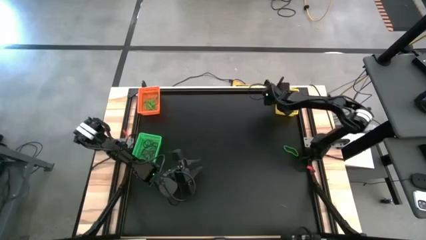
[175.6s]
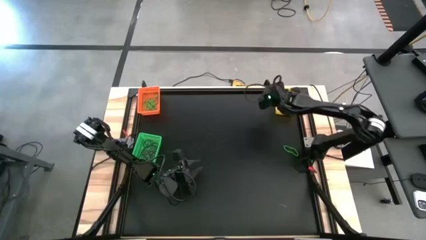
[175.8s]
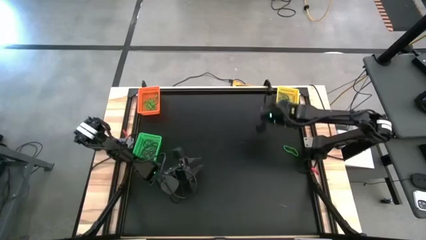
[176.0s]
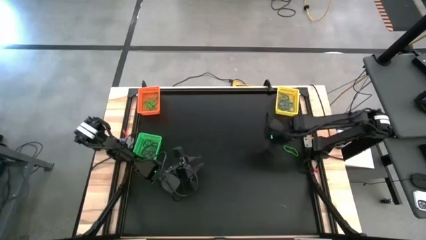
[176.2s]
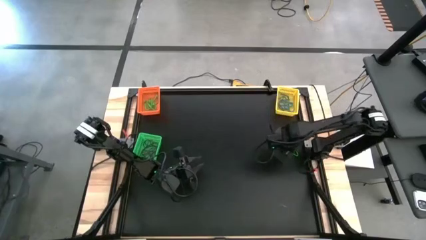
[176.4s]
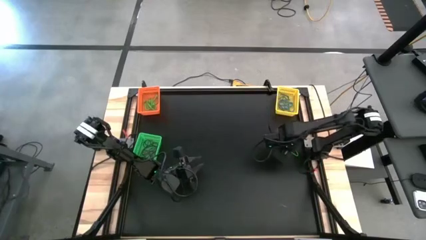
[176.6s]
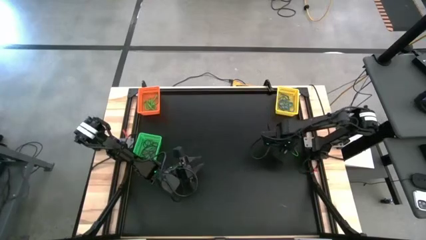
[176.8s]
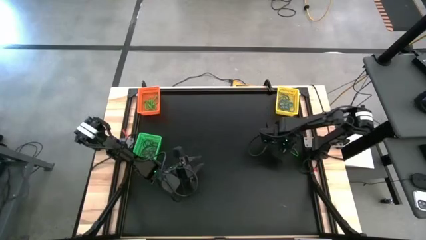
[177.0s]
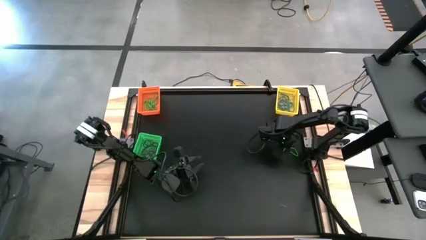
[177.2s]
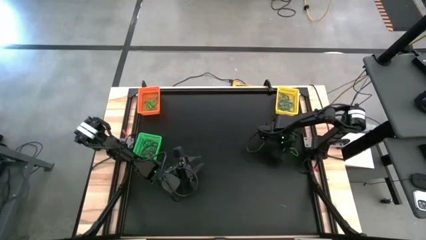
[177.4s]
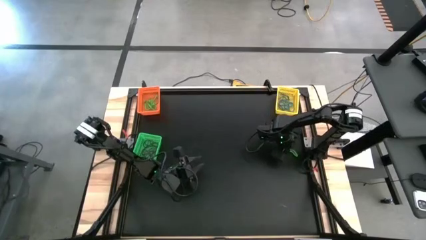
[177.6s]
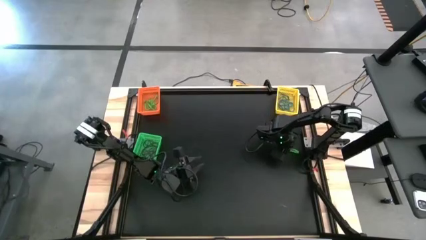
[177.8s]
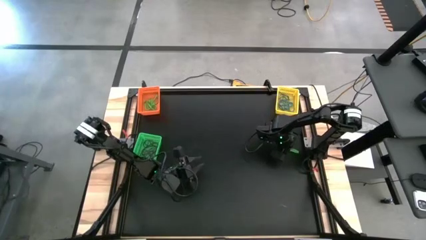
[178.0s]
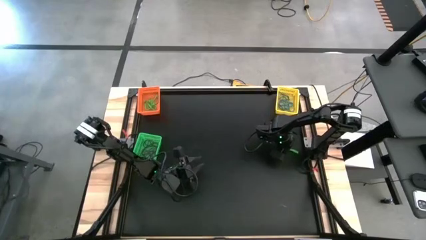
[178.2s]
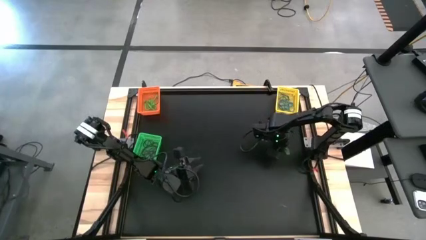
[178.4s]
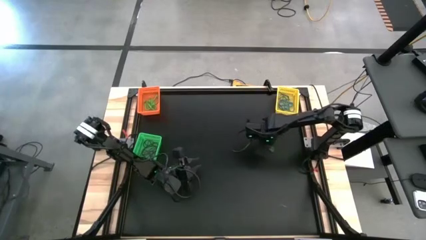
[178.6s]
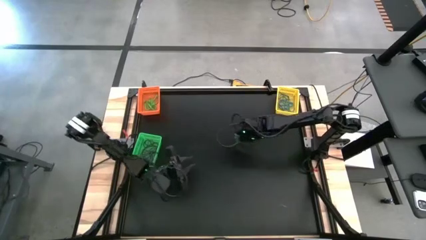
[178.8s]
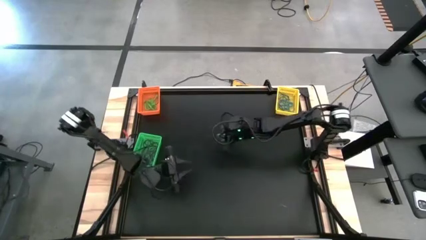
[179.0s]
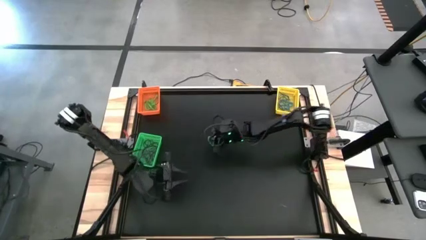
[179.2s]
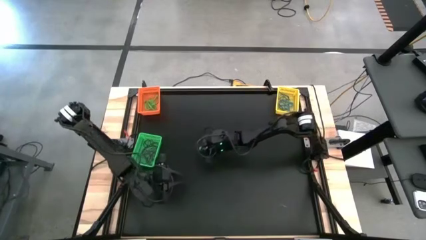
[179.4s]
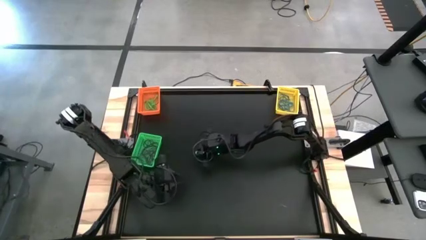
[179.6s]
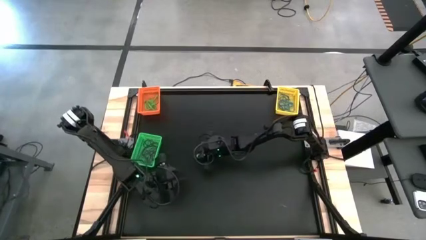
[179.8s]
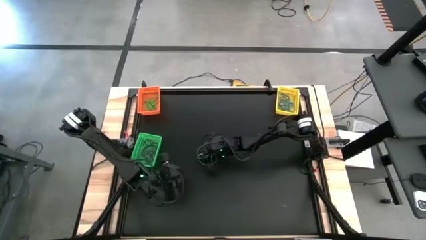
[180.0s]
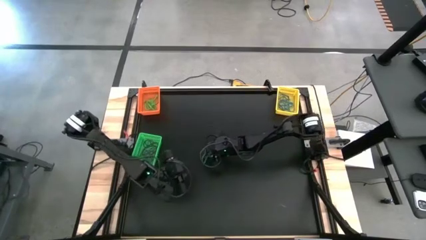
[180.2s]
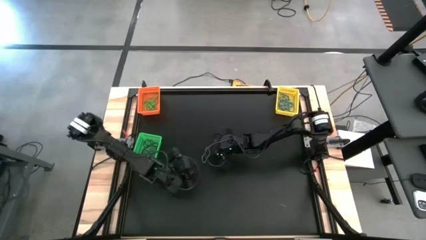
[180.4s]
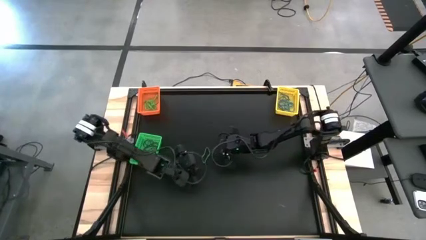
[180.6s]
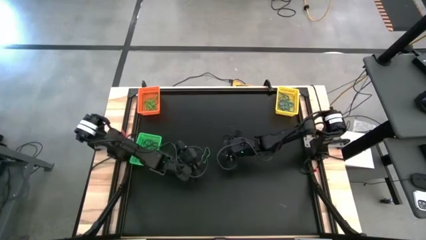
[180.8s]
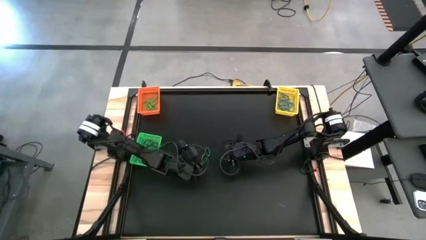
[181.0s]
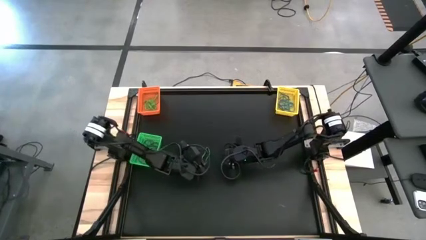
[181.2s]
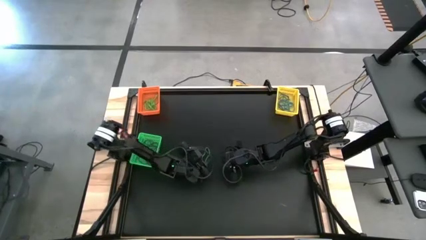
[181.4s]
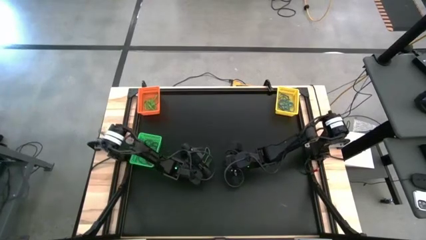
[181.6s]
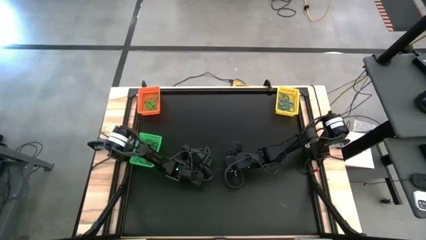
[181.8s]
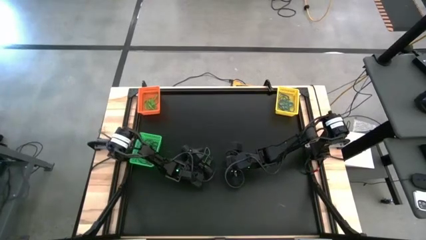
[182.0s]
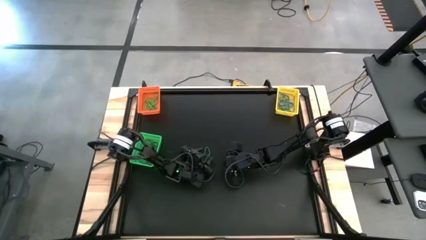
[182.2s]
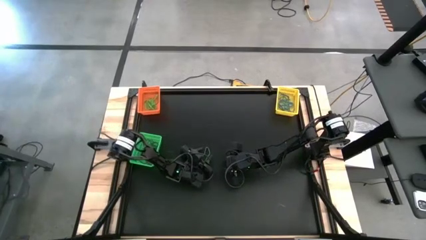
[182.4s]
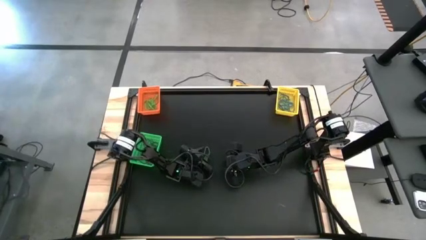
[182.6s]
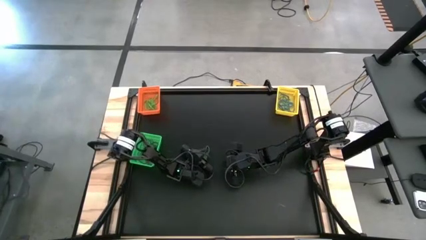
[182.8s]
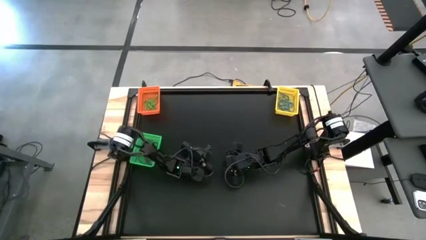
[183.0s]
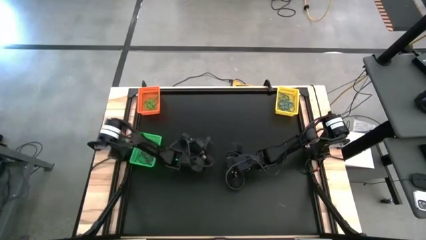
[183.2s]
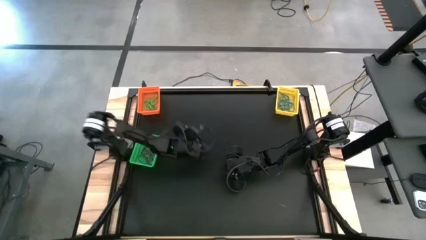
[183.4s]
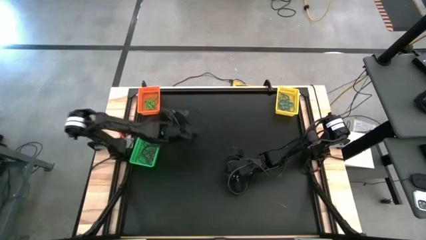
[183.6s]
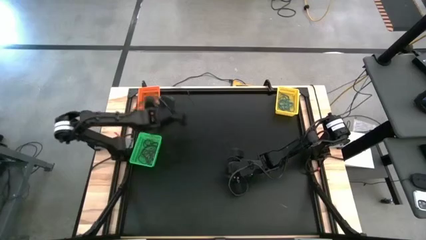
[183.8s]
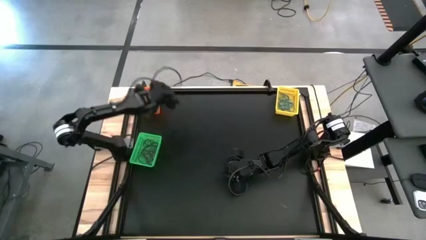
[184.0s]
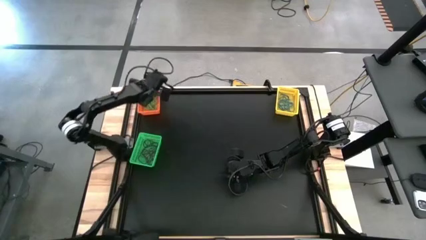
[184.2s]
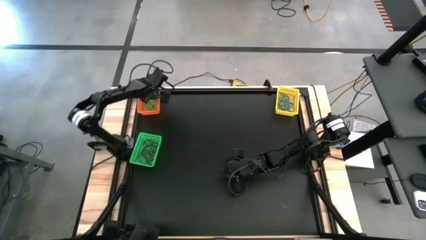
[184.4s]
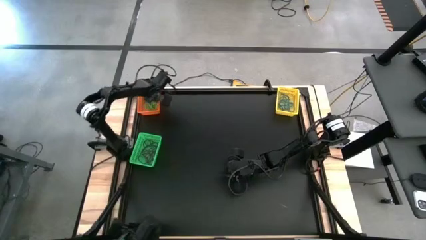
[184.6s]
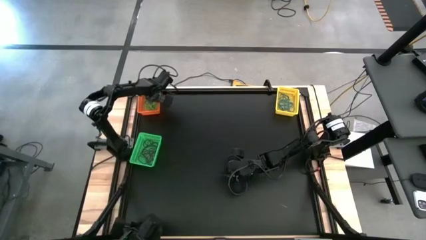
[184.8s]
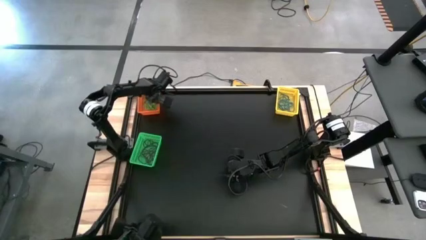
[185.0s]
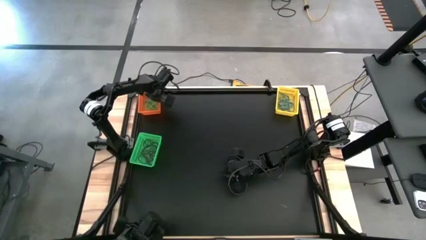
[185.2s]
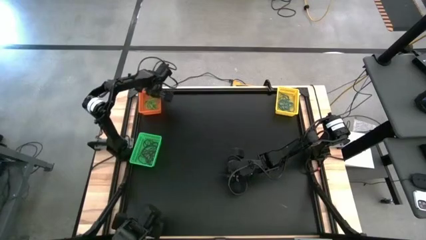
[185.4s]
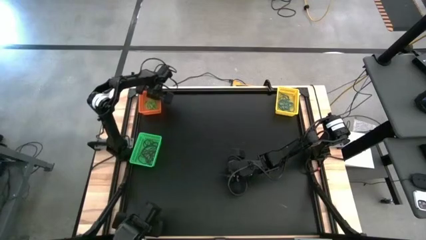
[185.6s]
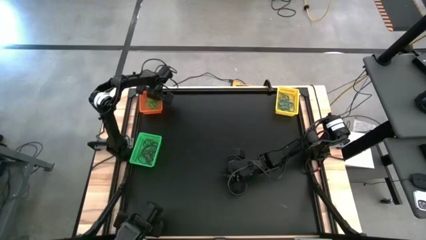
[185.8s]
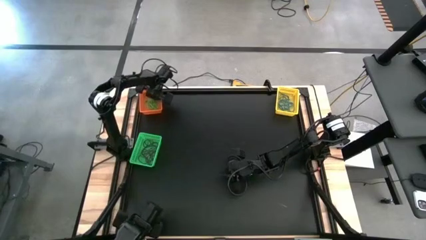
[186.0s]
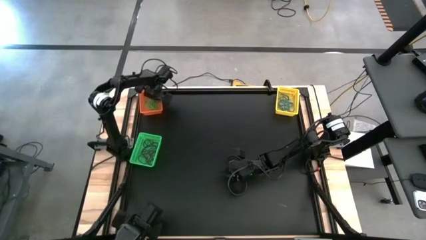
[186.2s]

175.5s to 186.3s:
Task: Sort rubber bands into baskets
Put the green rubber band into the orange bin

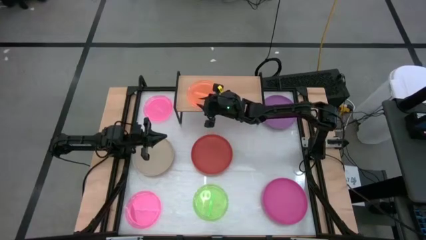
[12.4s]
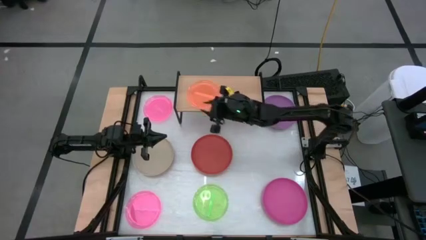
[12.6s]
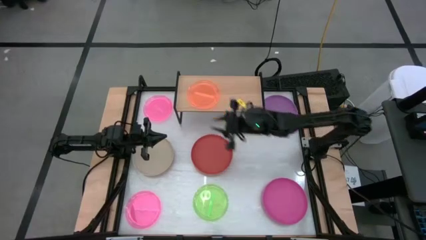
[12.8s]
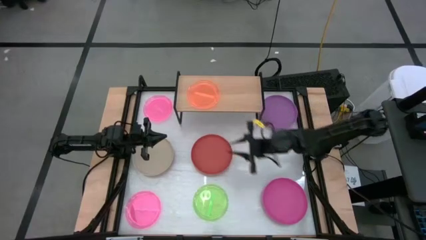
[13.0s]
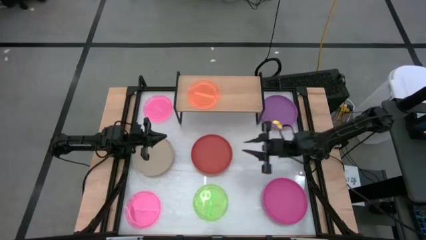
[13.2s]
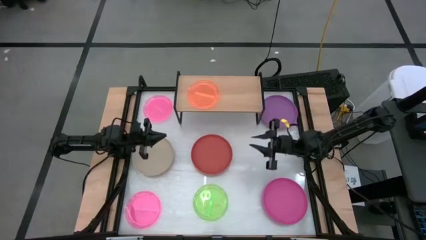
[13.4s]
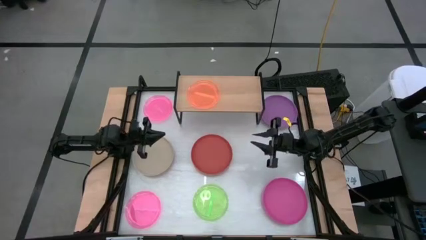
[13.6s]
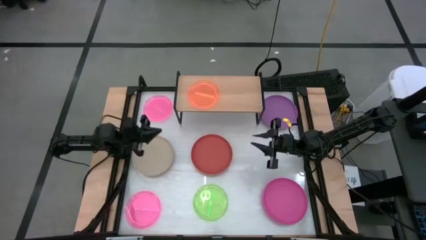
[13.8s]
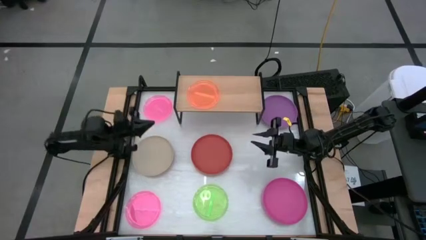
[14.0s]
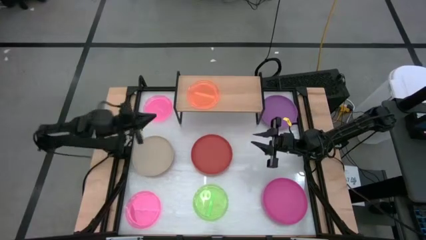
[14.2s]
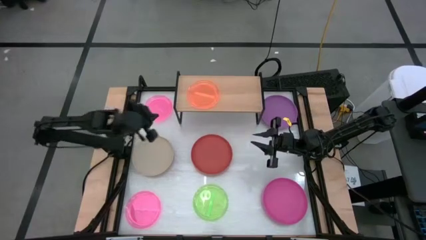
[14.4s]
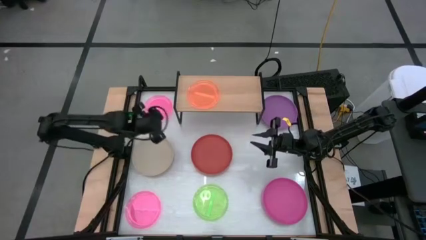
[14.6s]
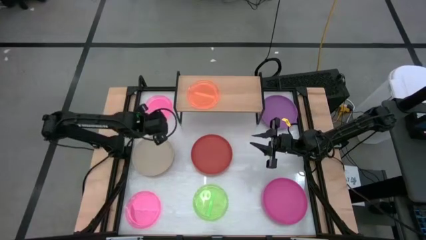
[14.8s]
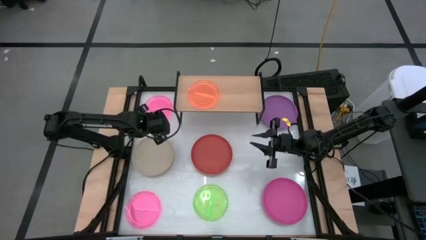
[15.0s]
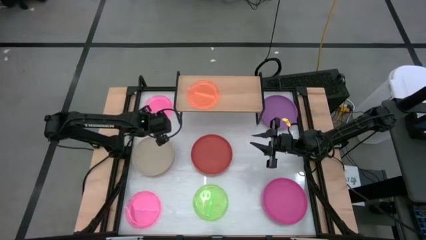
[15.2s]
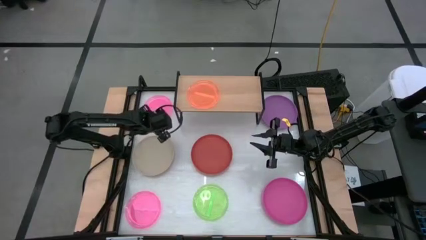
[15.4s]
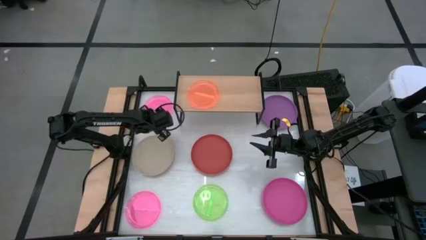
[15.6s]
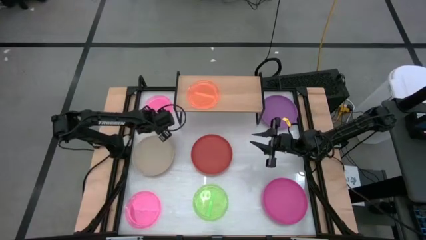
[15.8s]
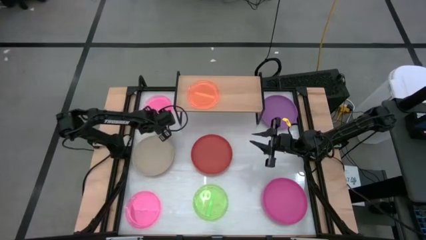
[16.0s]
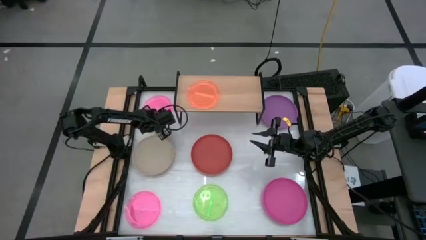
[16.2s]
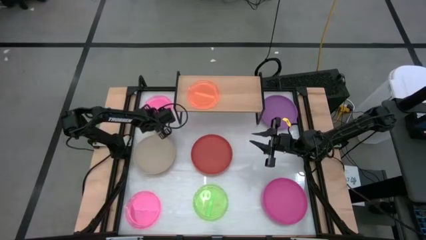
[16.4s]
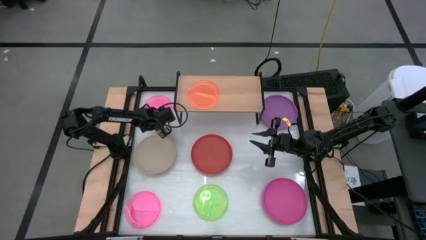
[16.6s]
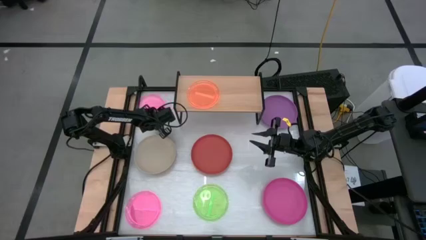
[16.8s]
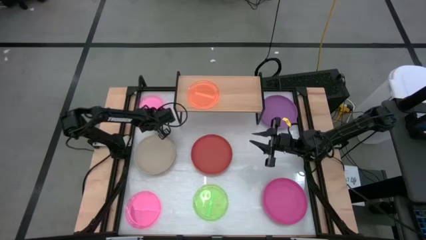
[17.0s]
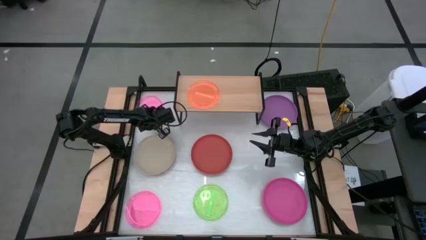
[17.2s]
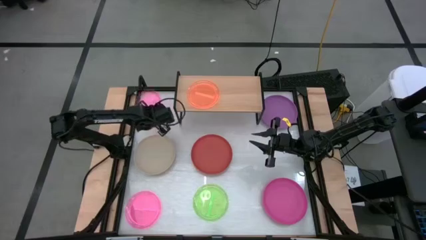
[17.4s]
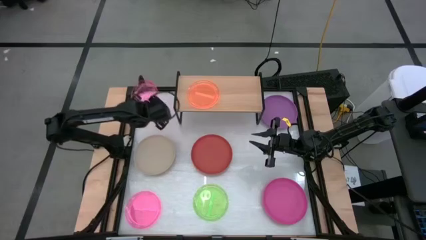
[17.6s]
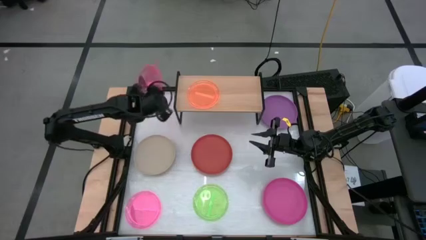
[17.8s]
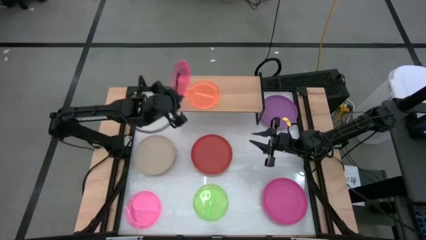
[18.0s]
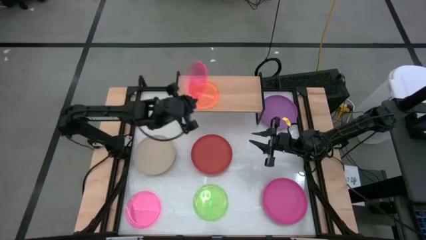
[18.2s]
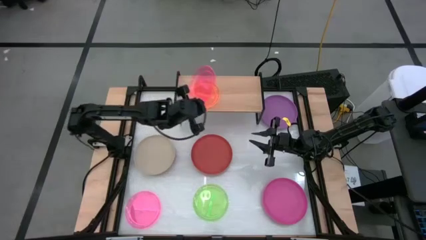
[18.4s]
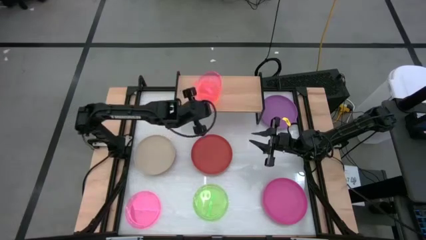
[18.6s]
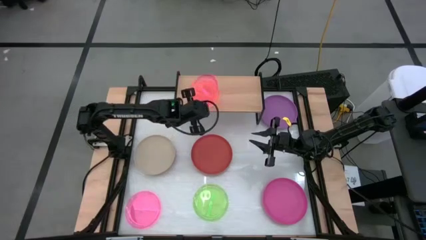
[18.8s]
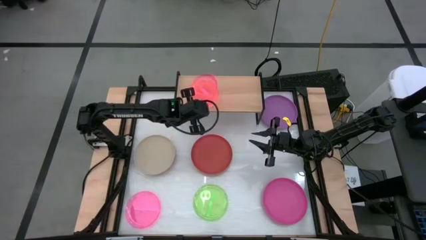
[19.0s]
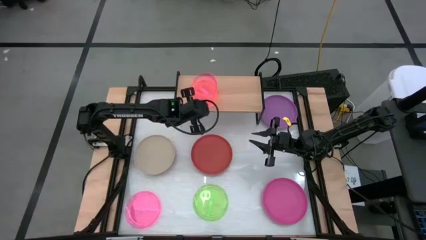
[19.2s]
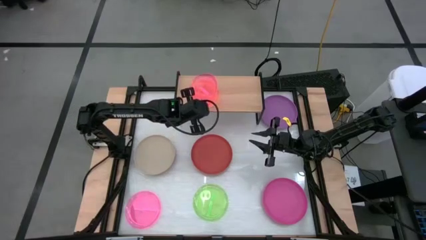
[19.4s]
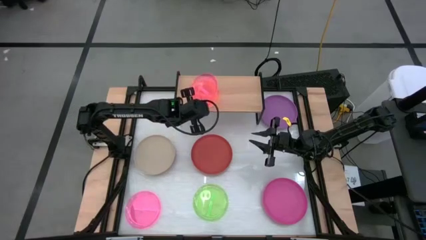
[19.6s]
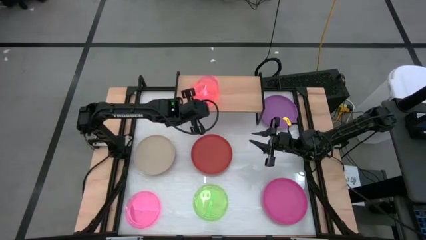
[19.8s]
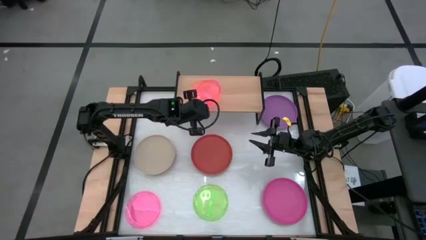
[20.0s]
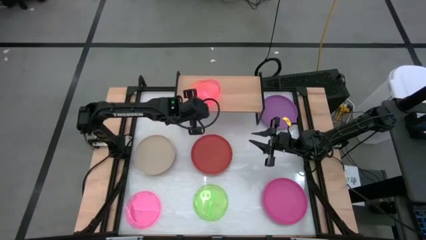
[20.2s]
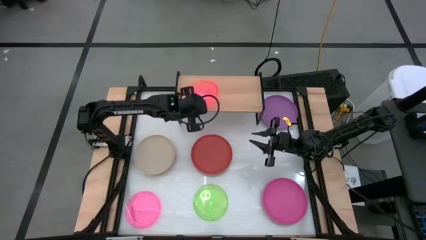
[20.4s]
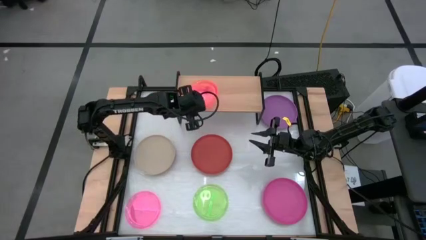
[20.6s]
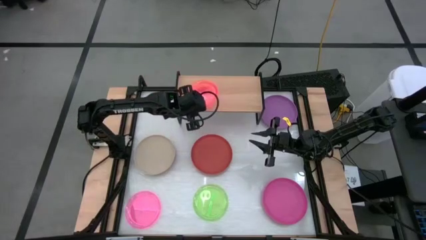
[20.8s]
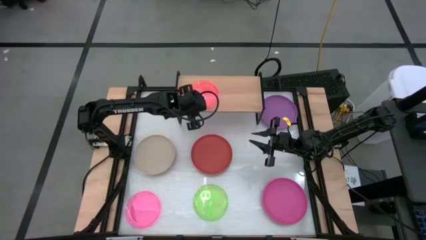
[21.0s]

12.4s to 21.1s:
Task: Place and stack plates onto a shelf
Stack the top small pink plate on top of the small orange plate on the shelf
